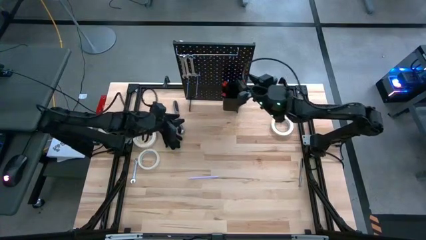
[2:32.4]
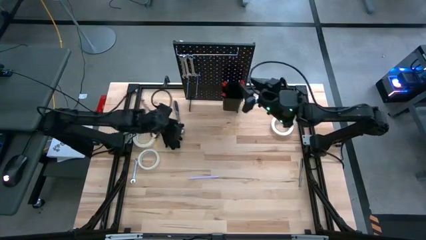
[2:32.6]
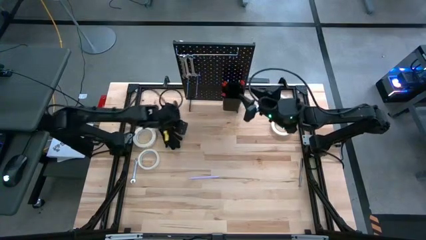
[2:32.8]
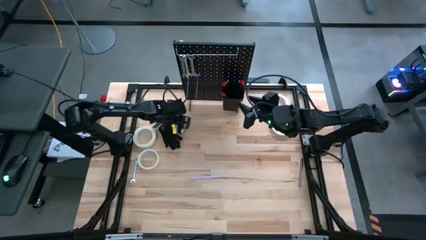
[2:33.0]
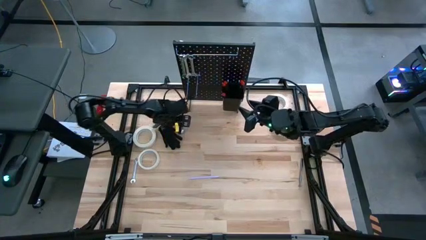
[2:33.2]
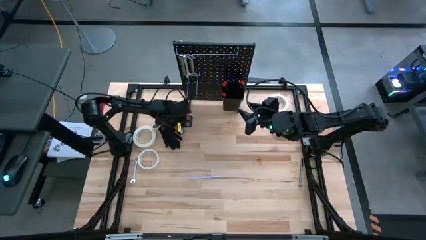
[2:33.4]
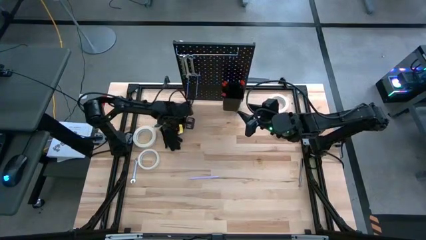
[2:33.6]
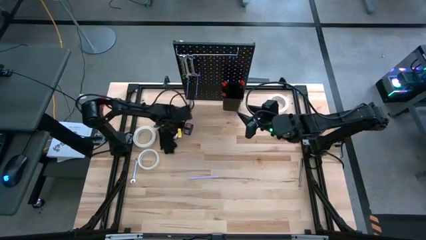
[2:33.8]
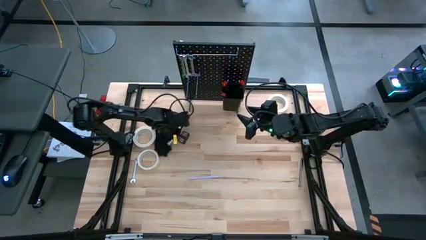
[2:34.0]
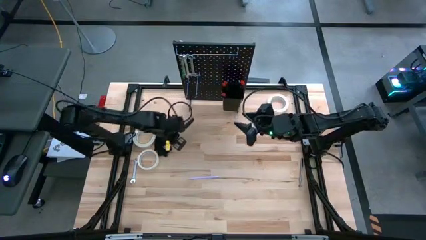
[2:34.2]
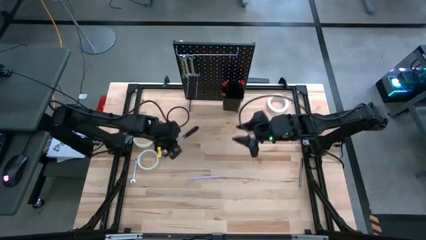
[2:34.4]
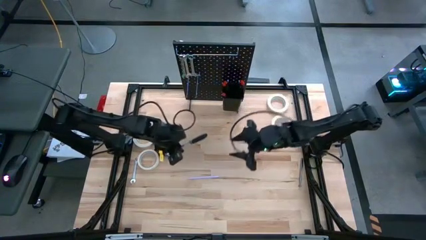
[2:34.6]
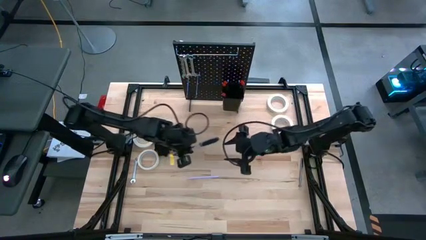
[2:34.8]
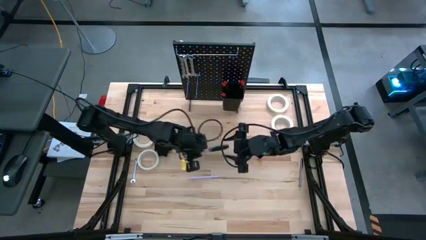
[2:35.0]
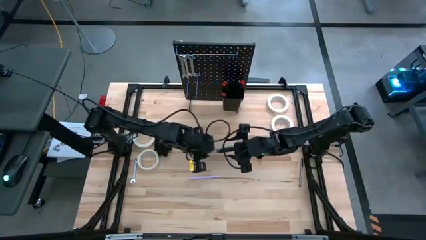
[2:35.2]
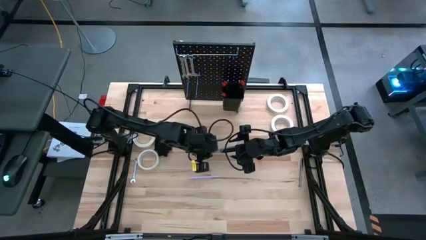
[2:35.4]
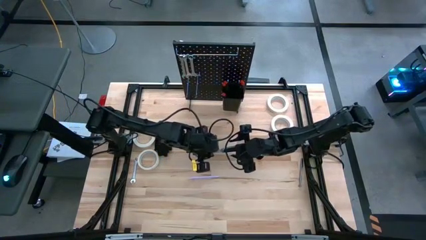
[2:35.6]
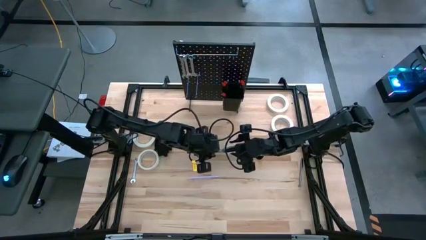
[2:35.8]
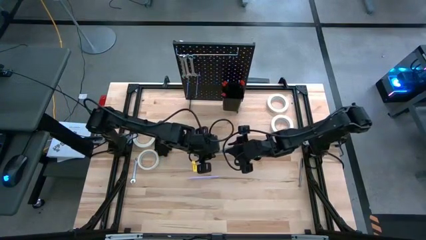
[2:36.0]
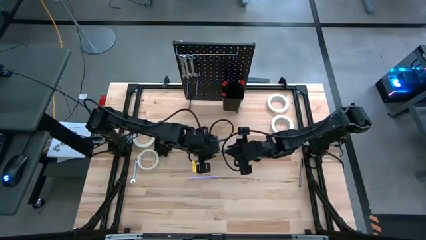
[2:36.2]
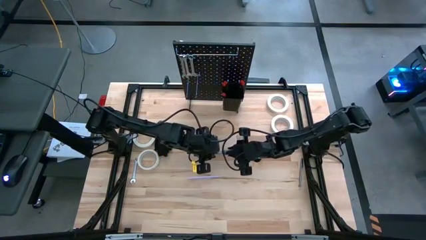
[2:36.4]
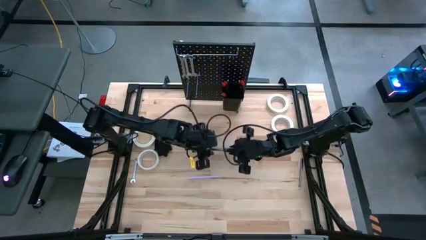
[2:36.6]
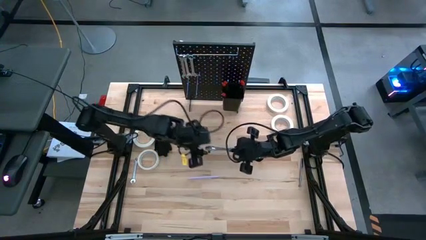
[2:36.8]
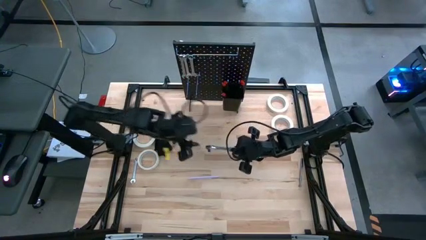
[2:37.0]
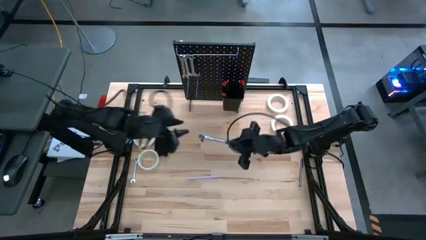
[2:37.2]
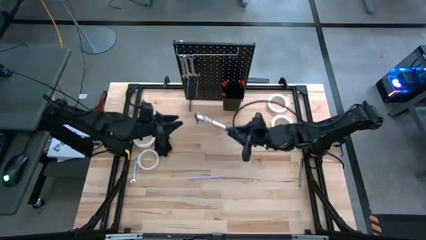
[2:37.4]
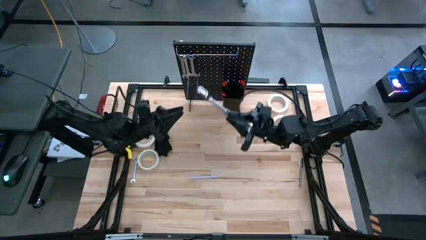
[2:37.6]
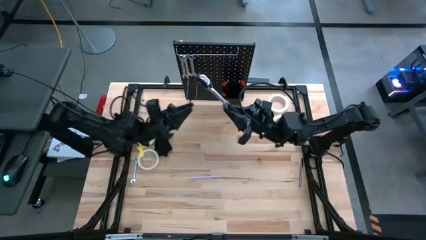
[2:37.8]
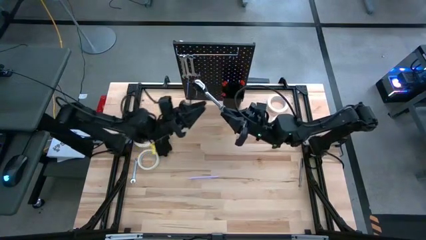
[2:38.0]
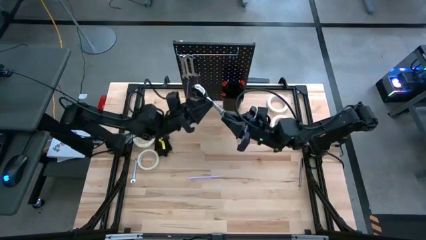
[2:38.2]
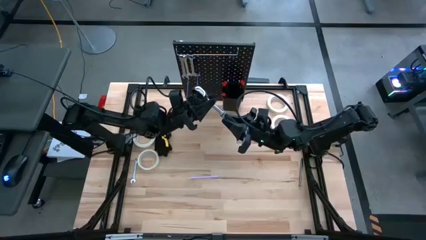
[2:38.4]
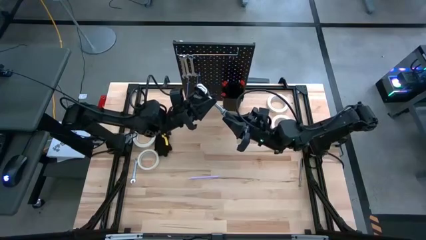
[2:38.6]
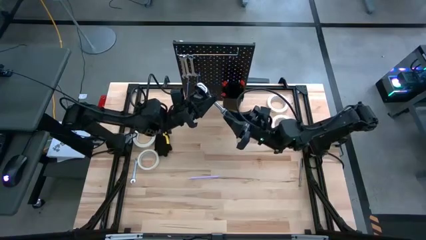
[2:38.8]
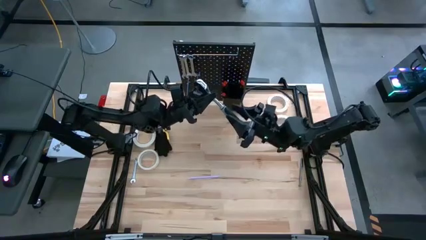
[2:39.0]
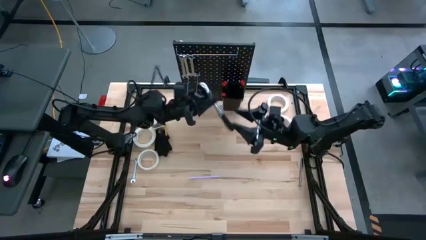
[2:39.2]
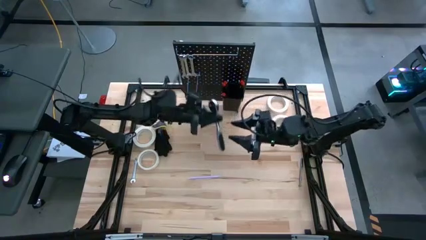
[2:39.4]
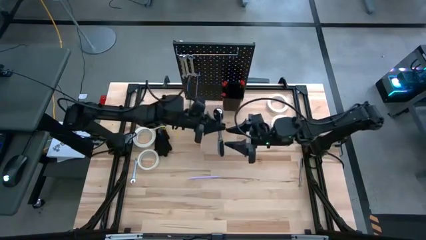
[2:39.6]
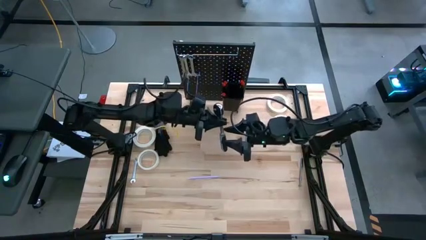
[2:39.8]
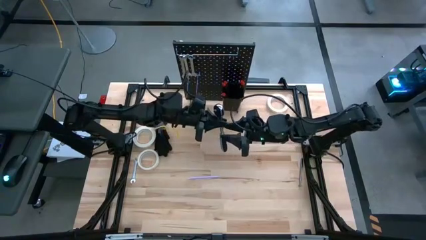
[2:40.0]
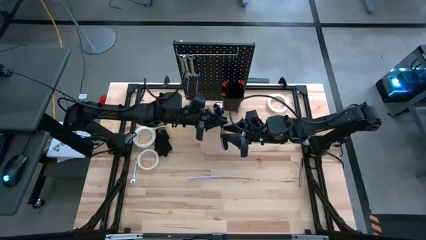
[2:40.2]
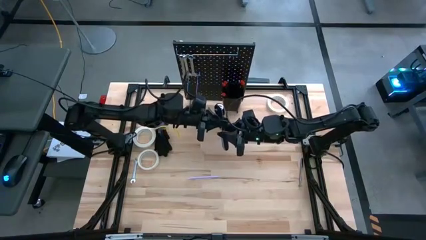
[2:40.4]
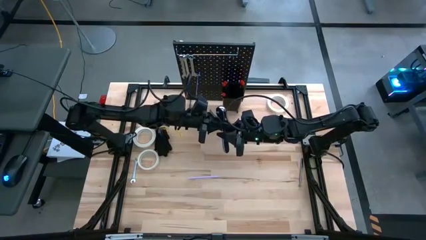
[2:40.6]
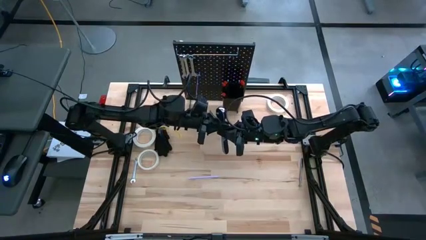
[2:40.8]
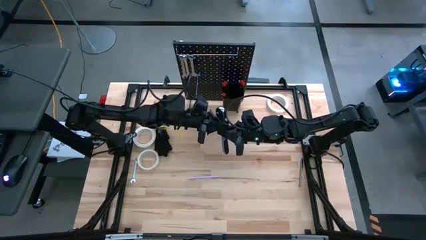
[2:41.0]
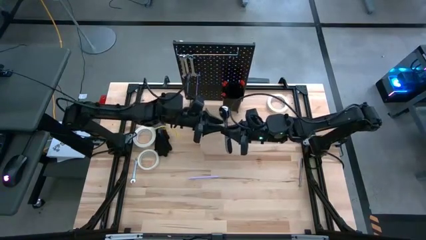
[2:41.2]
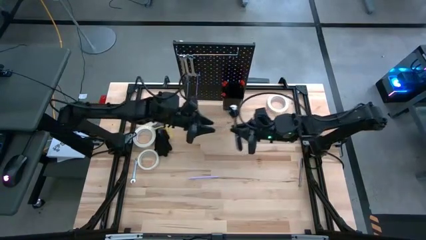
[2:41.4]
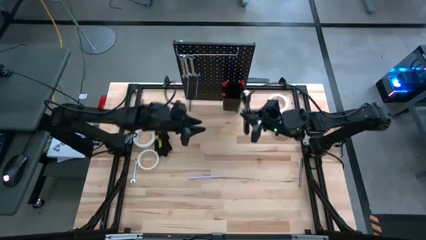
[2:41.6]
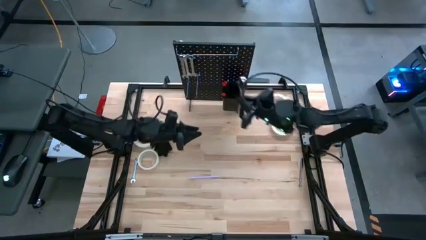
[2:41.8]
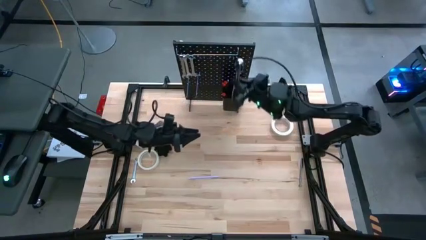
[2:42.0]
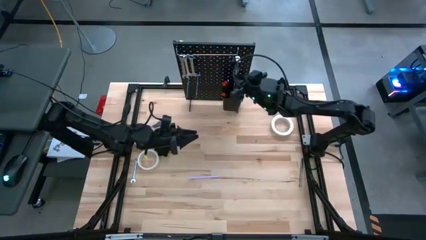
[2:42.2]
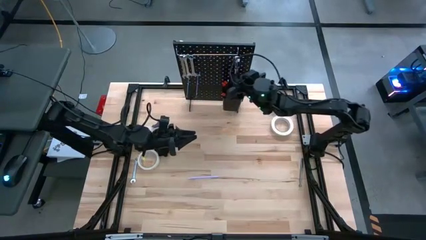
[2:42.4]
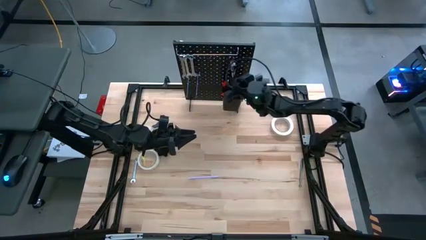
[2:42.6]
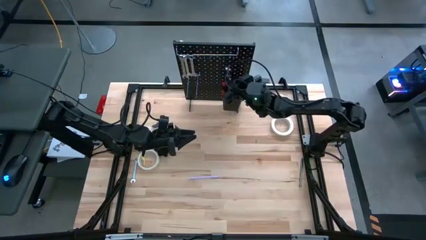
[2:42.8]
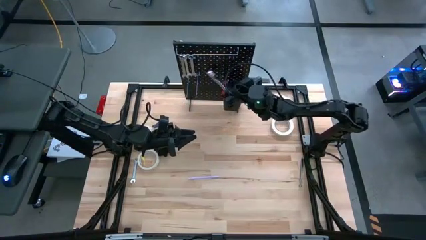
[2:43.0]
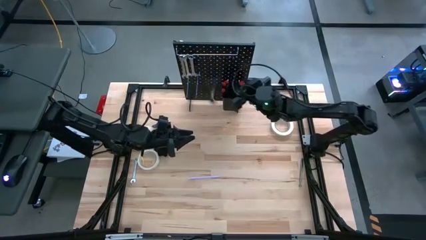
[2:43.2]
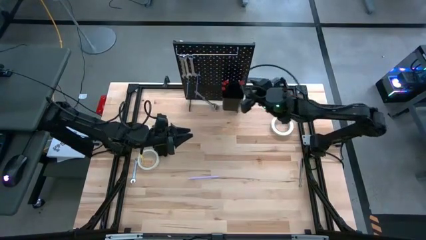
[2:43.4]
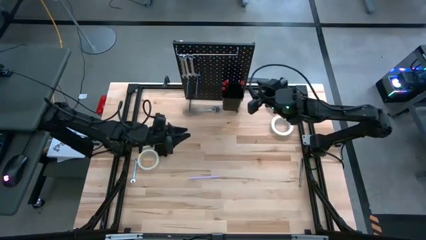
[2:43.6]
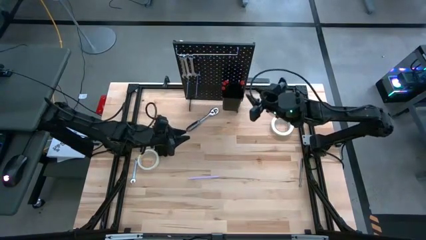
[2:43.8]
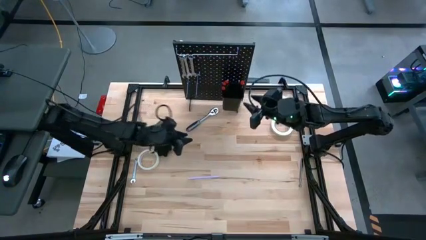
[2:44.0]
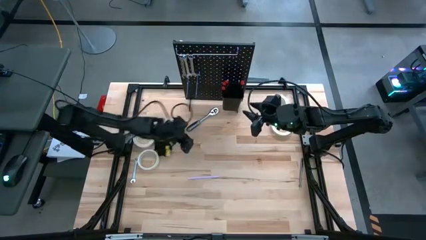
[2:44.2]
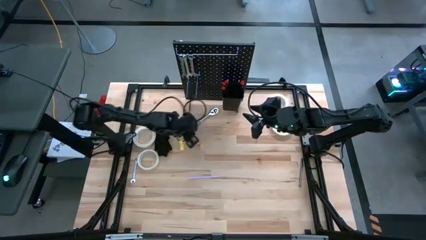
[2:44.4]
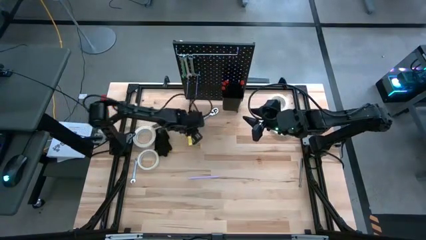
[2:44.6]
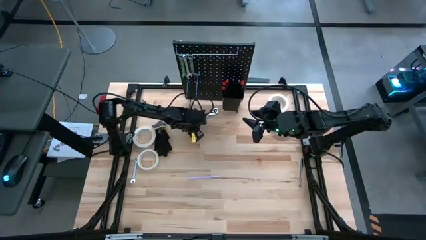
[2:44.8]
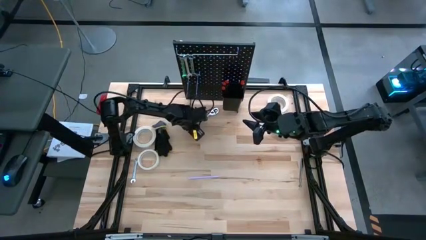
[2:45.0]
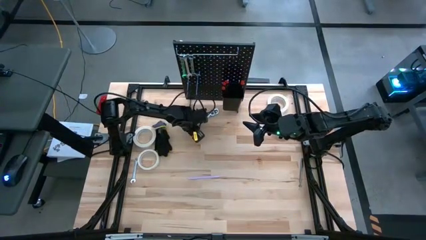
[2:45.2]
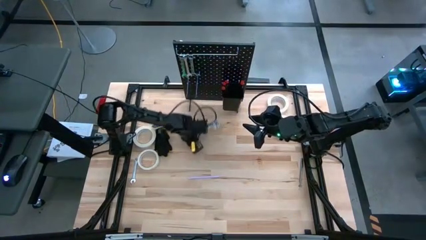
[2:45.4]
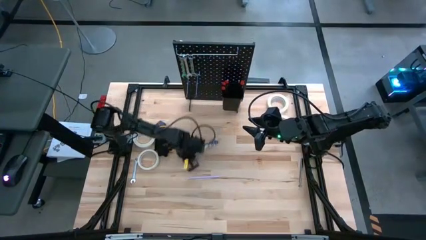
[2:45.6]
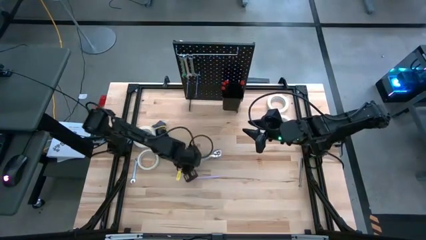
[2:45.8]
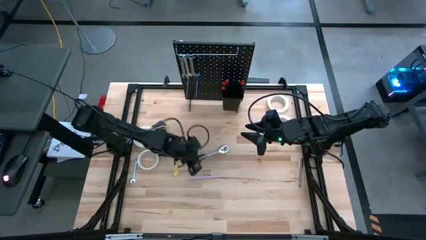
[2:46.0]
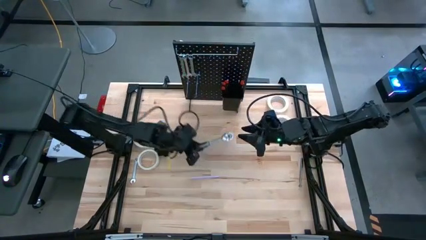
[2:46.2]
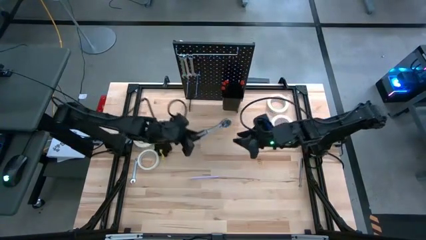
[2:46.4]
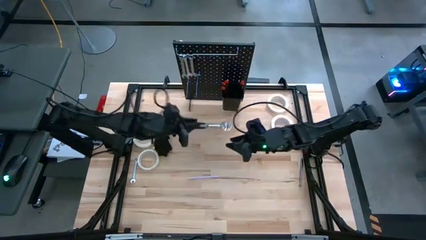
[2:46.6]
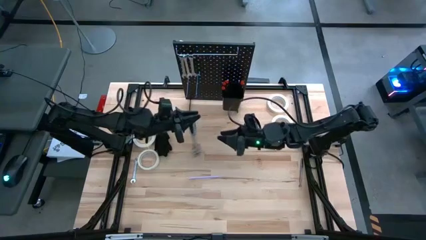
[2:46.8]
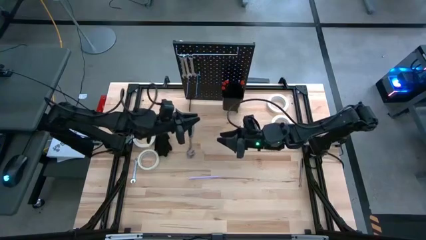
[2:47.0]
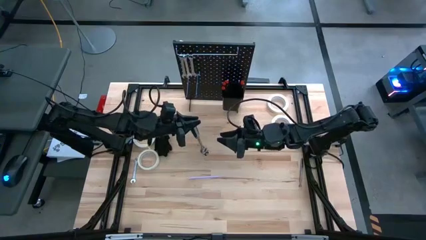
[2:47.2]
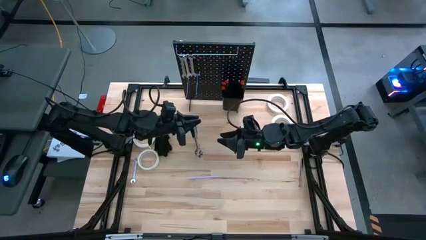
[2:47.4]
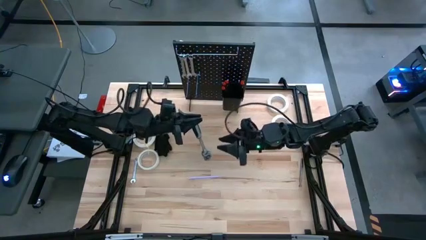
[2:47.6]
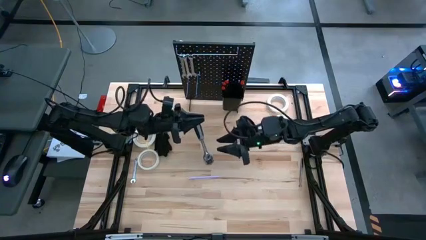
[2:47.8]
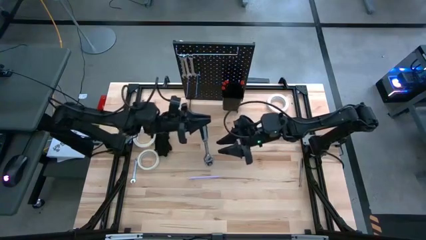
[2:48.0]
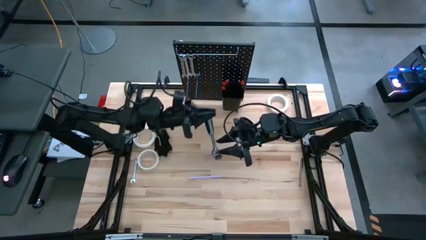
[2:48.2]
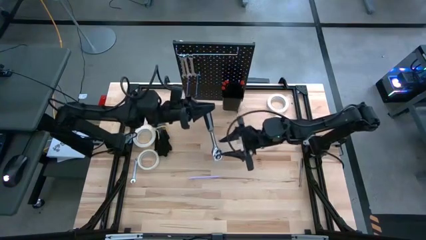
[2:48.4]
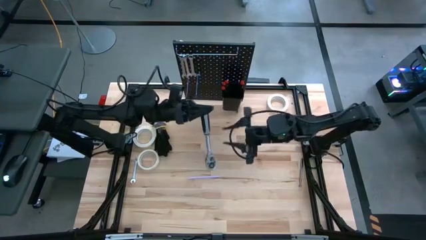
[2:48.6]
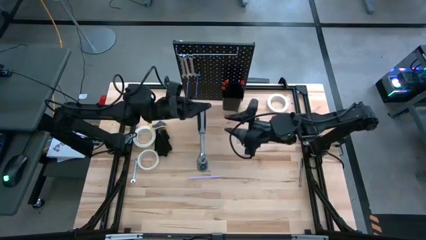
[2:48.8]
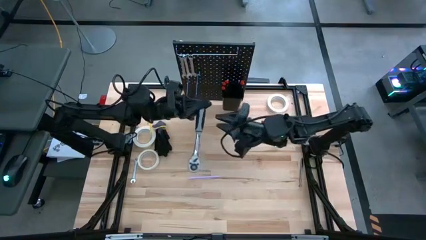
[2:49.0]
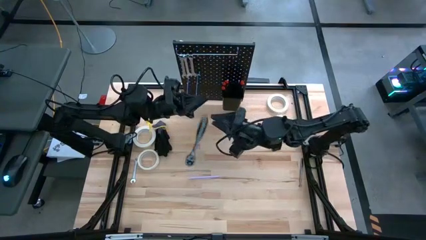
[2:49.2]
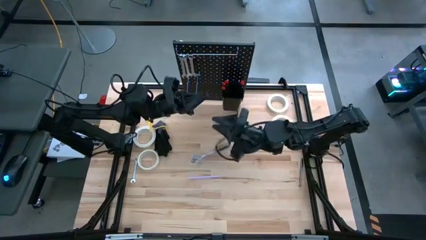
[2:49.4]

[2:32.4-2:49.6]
Task: Hang tools onto peg board
Put the socket wrench into the black bin on the pegboard
